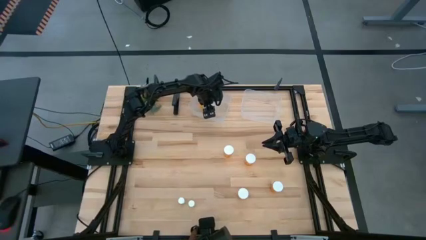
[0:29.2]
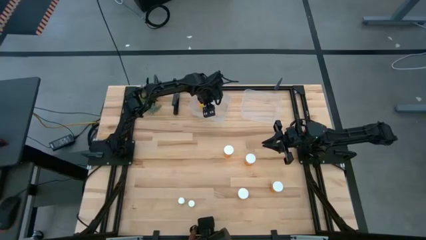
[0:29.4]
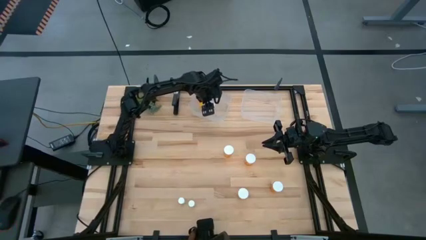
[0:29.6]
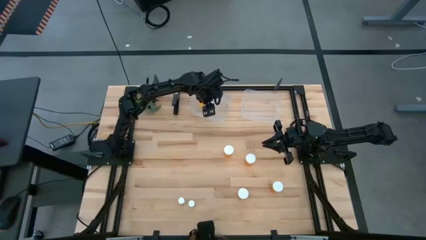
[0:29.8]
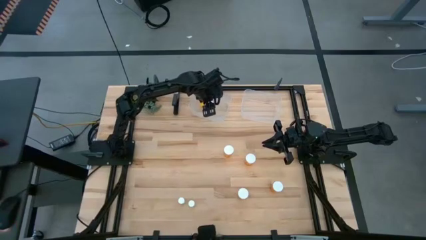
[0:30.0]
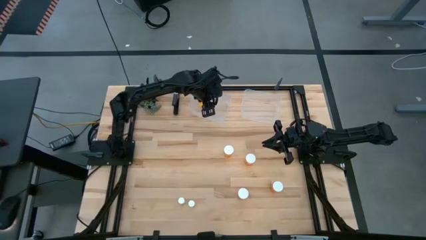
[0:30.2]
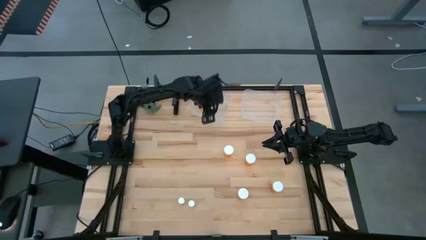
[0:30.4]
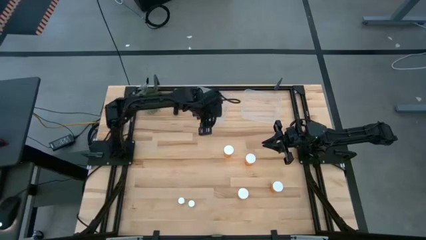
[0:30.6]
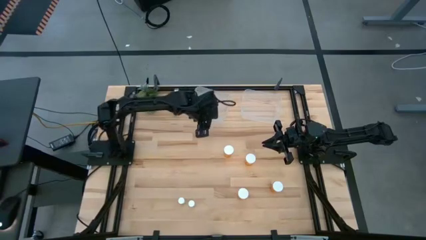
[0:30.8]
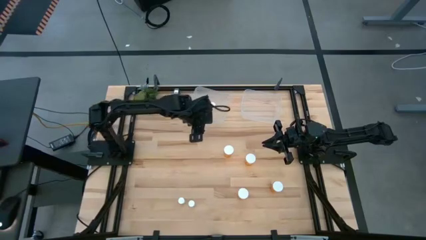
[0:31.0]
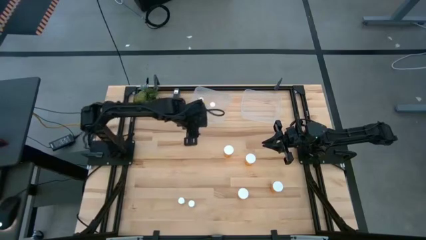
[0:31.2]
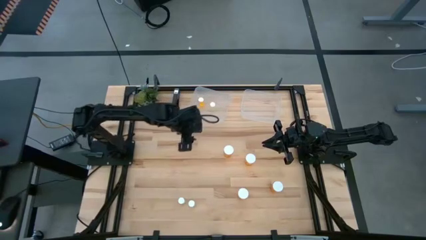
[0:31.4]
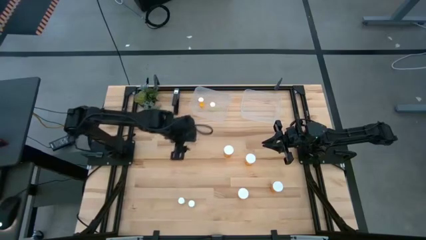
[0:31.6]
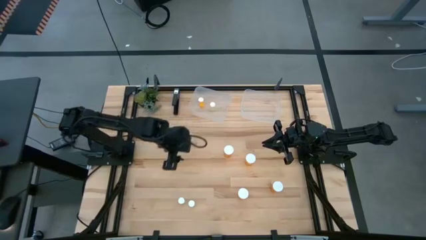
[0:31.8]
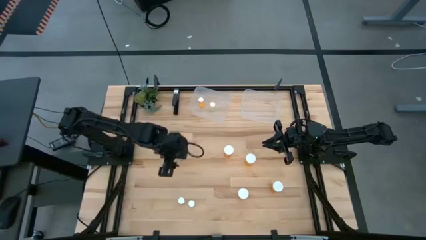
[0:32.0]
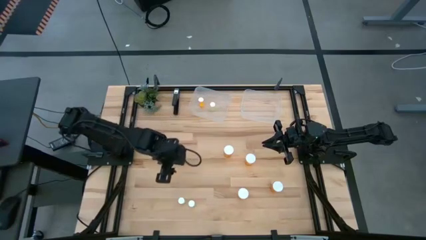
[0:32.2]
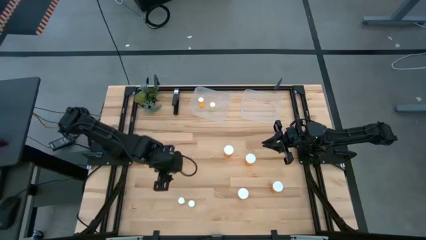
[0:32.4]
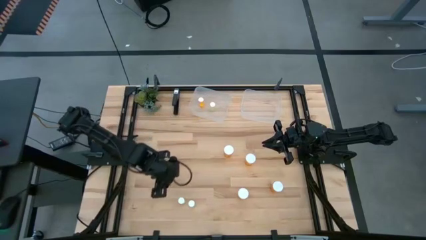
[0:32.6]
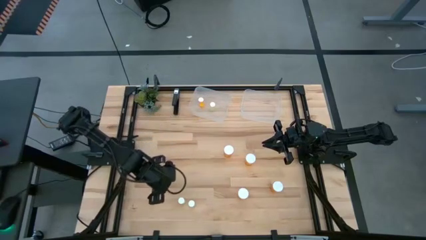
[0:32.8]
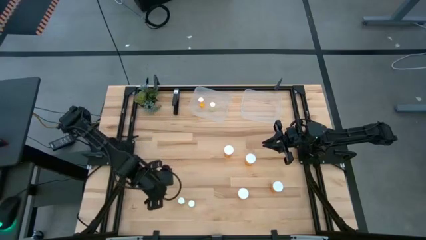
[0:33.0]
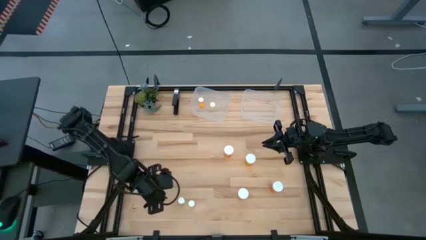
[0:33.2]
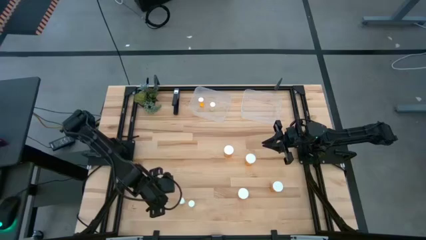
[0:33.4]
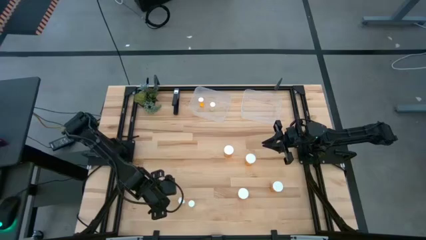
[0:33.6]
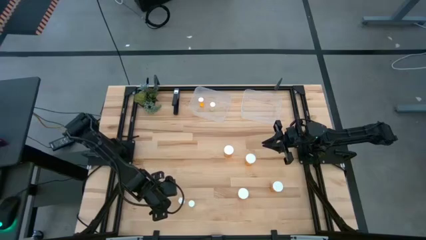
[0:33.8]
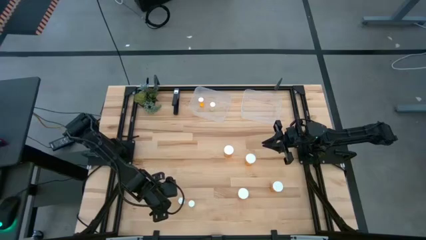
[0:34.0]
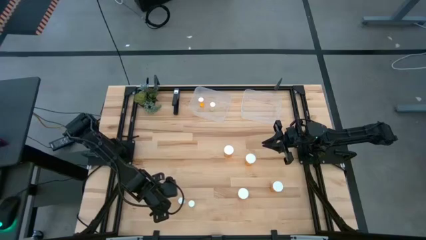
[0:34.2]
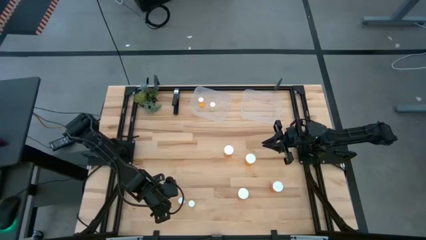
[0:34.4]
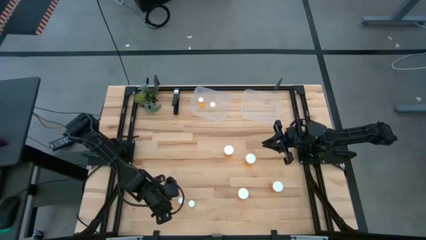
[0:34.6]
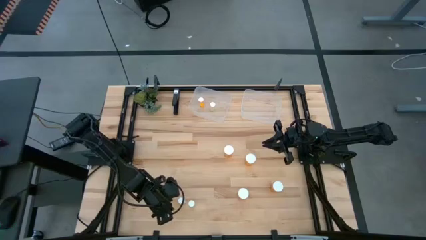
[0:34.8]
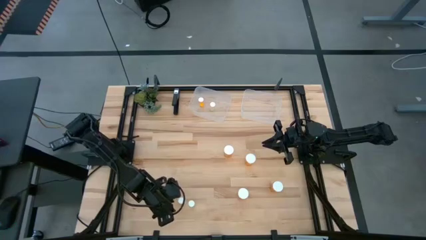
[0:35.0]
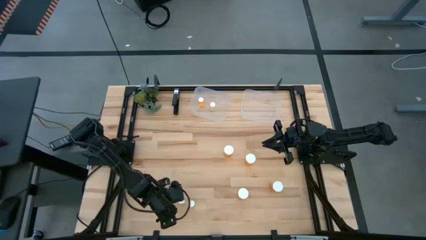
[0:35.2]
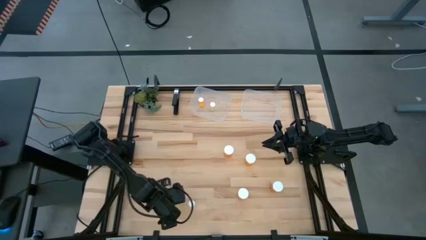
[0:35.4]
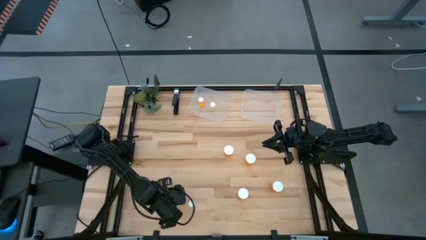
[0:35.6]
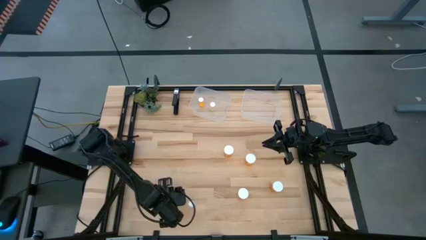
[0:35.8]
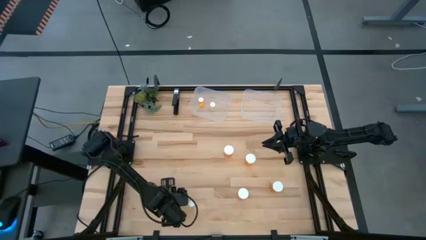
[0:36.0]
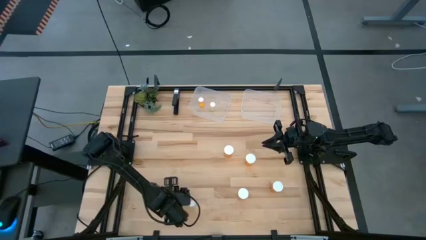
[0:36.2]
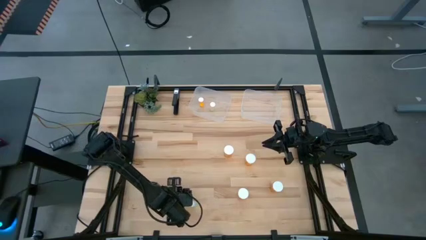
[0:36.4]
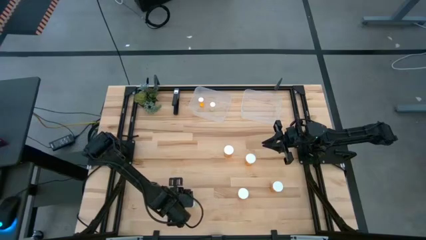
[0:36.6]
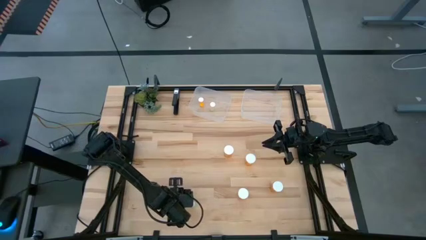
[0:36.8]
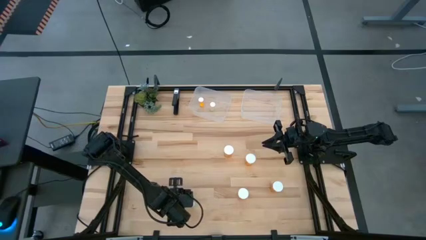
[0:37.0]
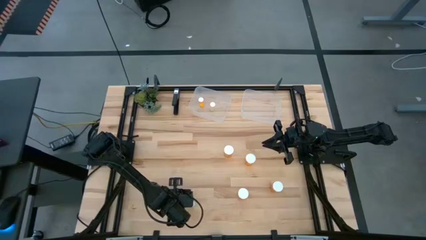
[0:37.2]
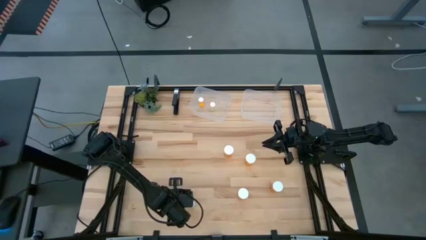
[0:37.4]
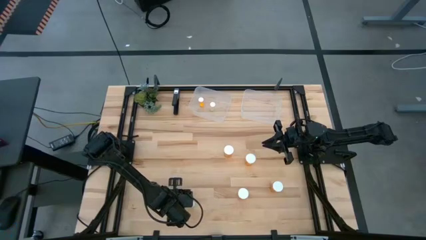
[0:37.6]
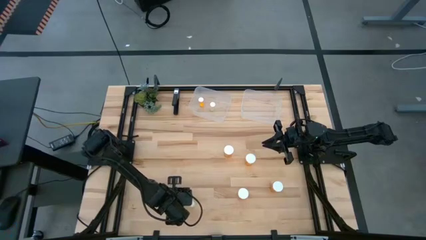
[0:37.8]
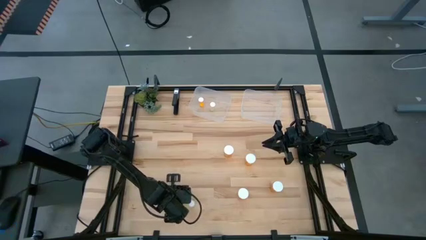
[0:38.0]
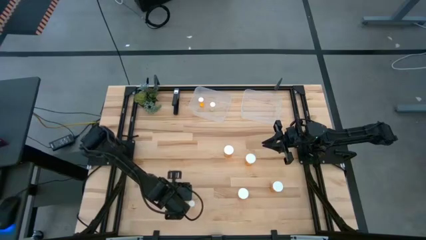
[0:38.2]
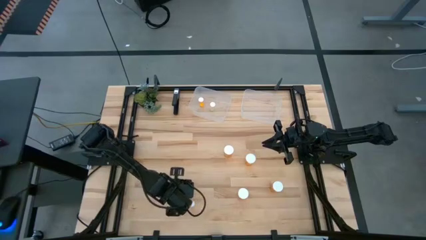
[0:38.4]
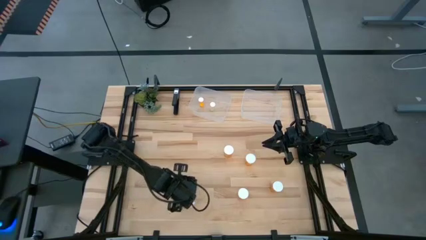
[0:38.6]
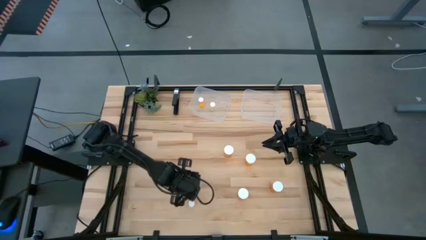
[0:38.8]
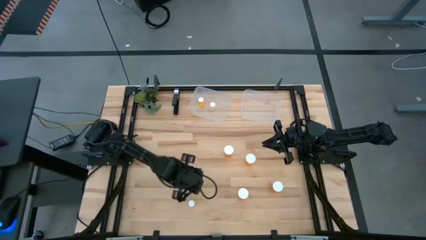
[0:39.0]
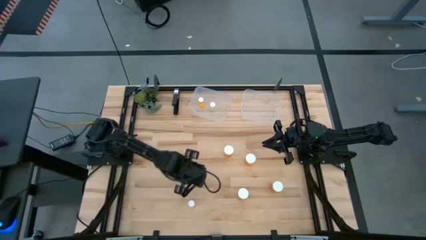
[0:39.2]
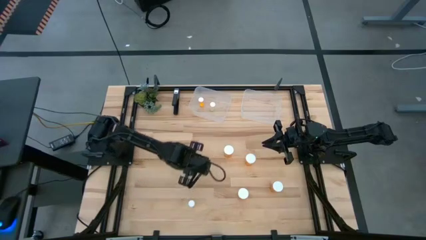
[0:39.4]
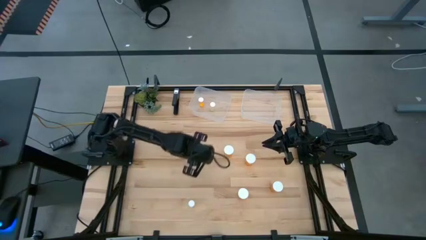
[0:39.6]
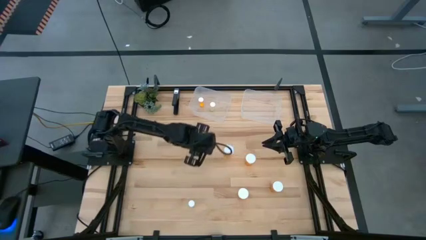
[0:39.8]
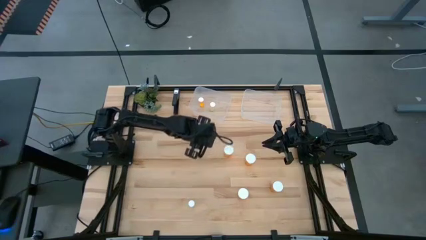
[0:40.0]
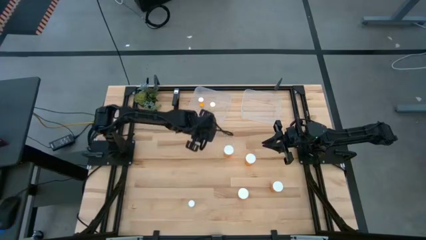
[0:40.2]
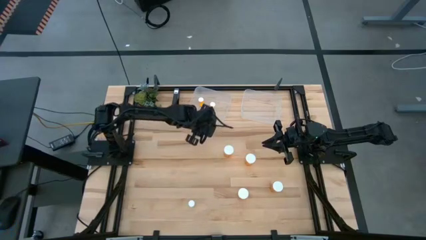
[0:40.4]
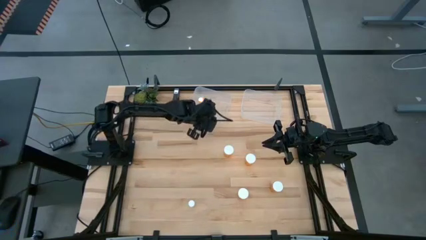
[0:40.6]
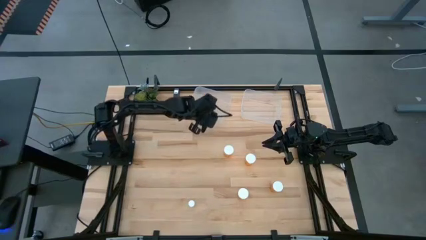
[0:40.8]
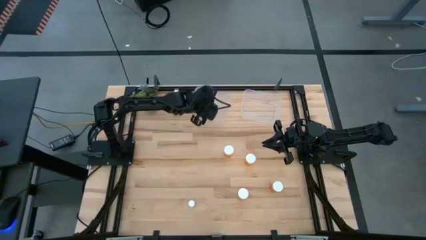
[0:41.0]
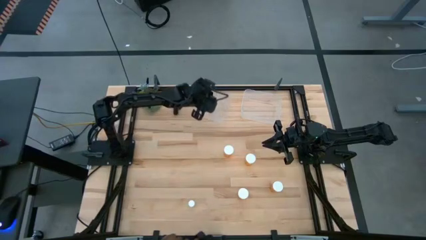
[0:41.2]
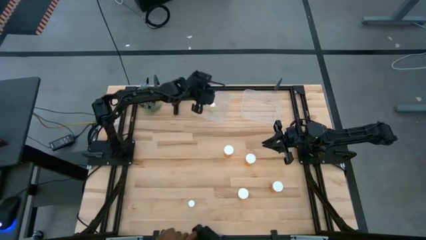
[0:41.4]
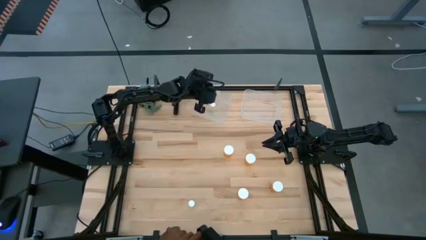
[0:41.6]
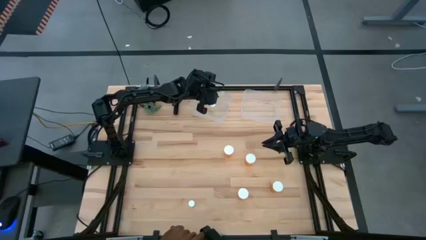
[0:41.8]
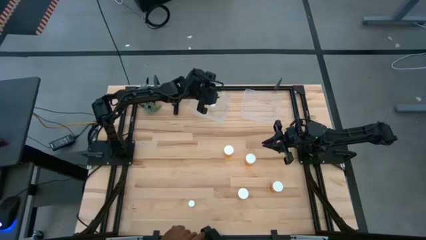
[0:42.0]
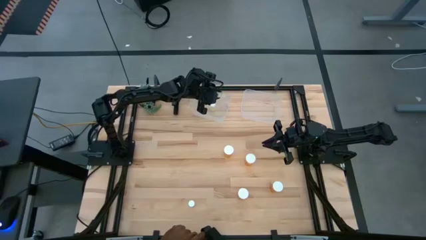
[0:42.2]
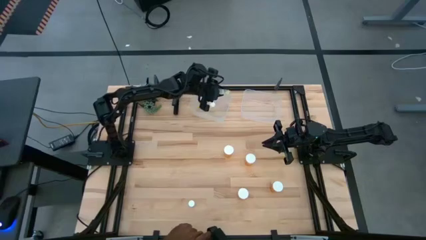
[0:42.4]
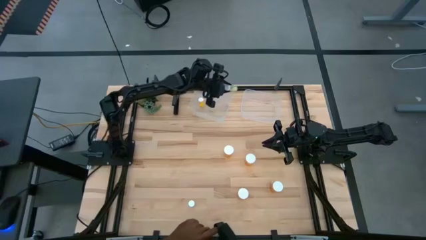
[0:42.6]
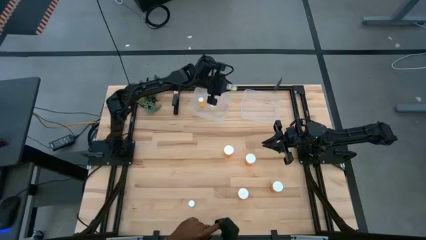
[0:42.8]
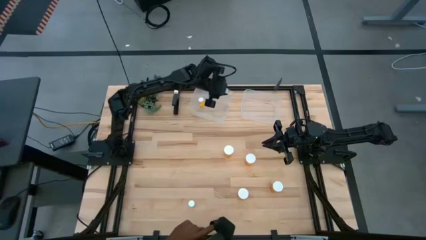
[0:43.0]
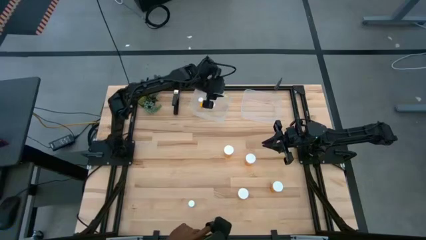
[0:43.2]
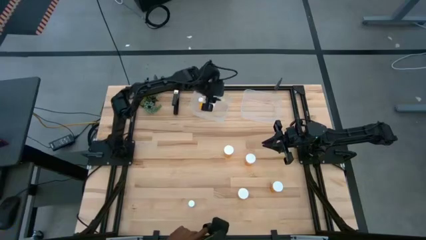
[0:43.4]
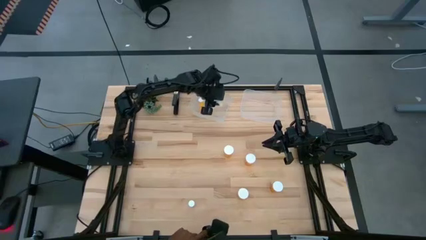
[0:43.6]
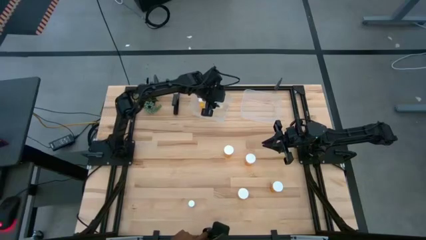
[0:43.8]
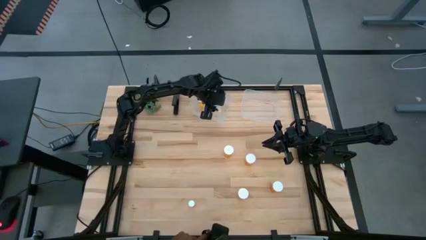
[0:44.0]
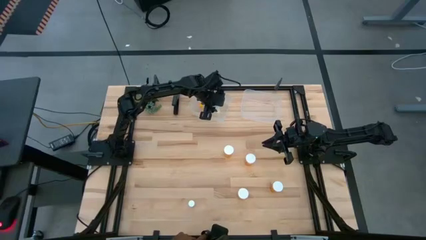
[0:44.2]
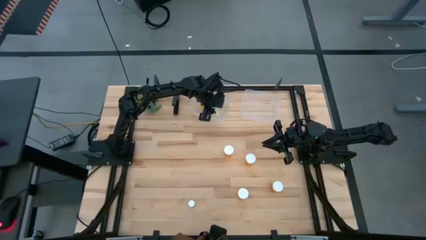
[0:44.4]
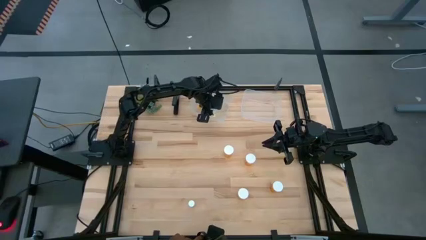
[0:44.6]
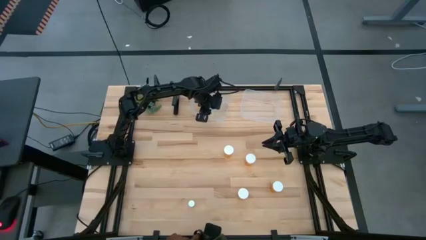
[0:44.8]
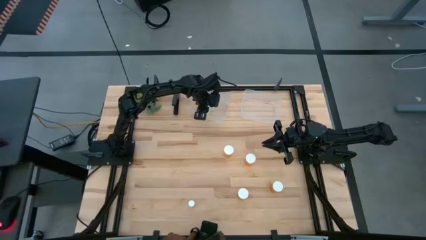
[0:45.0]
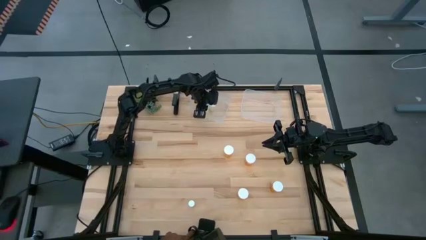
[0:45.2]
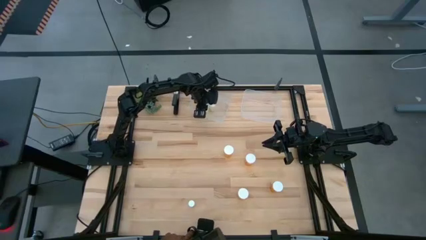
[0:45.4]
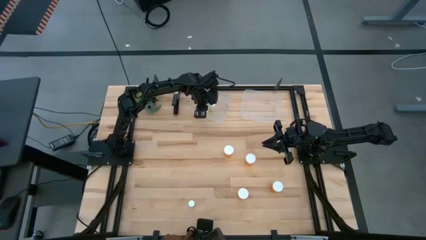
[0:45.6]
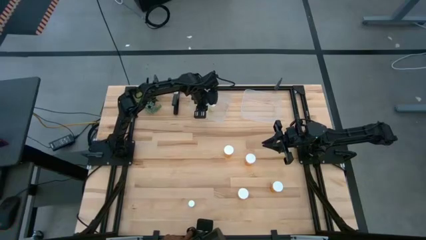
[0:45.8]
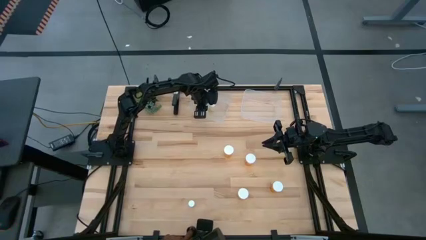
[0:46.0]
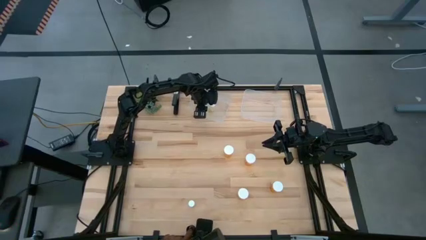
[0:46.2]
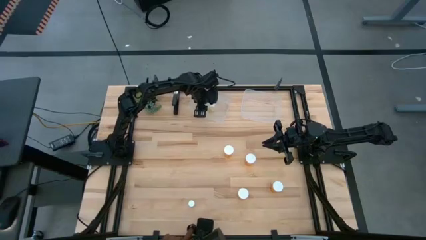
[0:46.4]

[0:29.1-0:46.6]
Task: Pick and place medicine bottles into bin by pill shape (circle, oval)
Put the small yellow pill bottle into the left transparent bin
